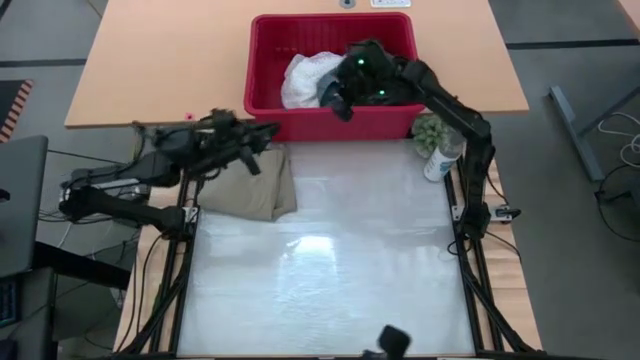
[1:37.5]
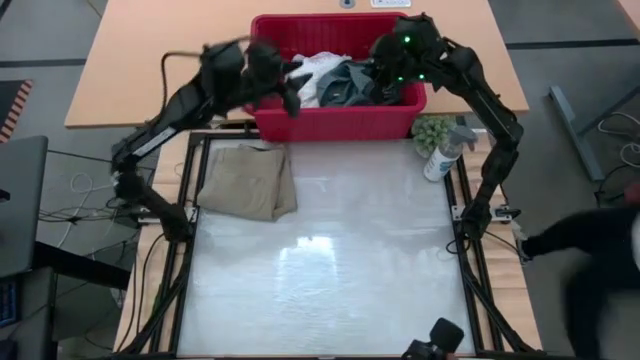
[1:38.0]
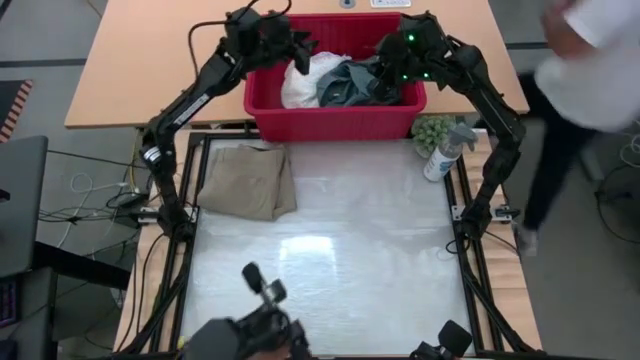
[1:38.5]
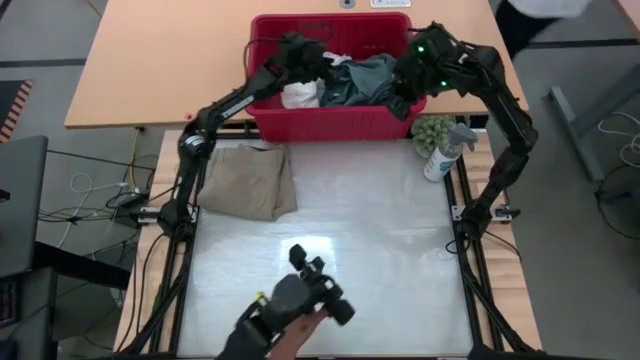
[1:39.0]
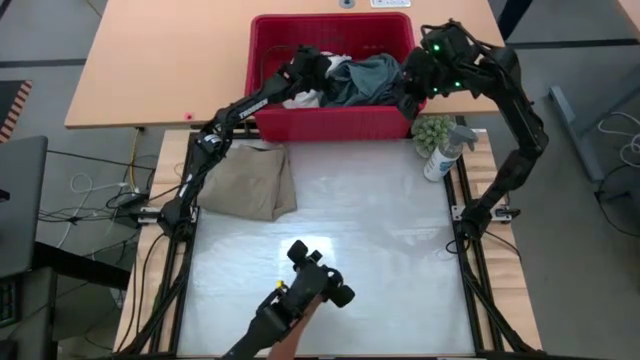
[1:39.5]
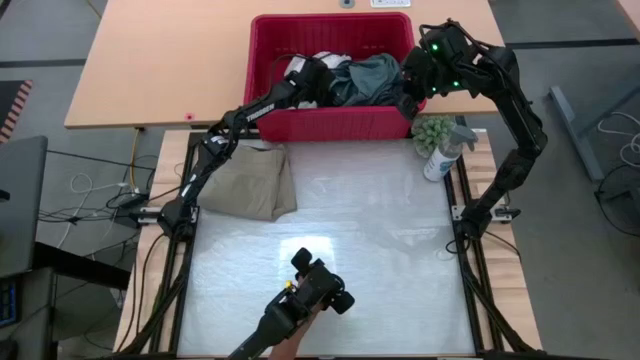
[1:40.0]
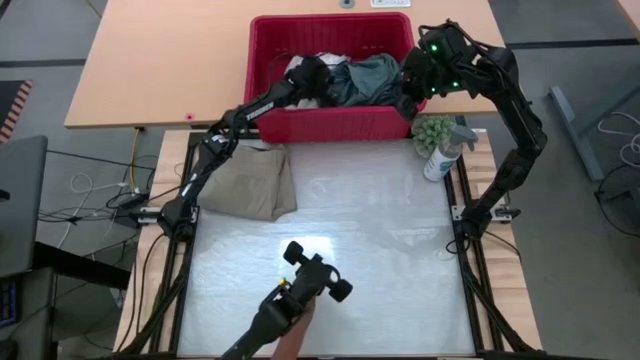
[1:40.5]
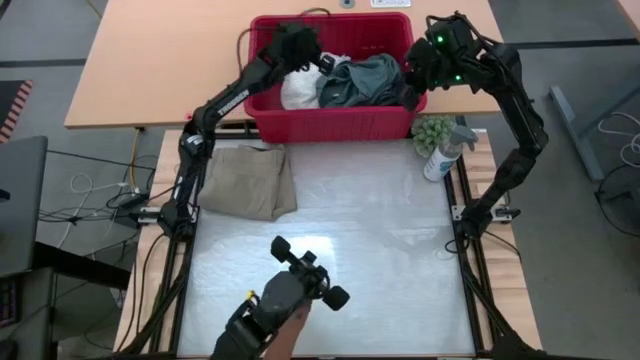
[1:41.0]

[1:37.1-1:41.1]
Task: Fold Laundry from Bin
Fold the blue pants in the red bin

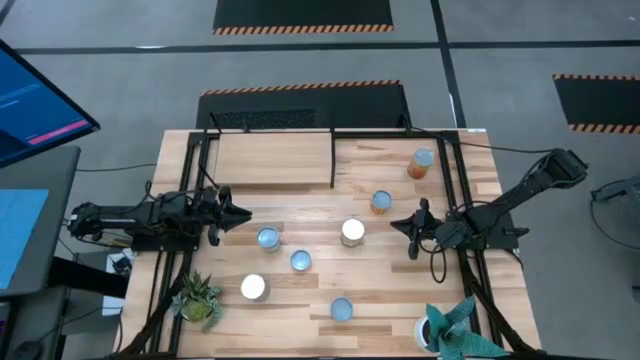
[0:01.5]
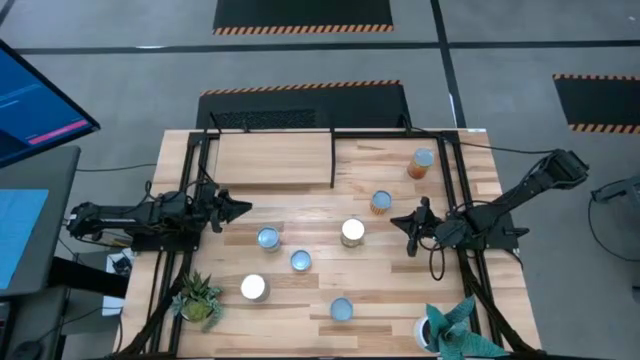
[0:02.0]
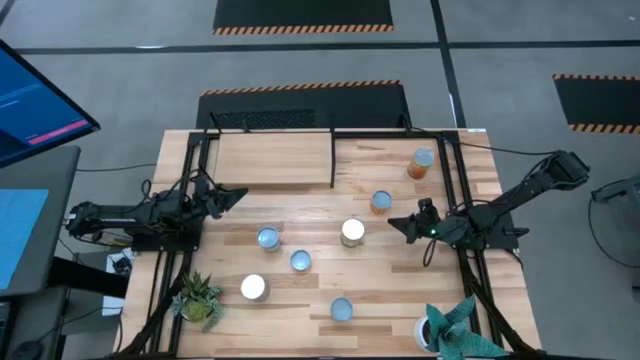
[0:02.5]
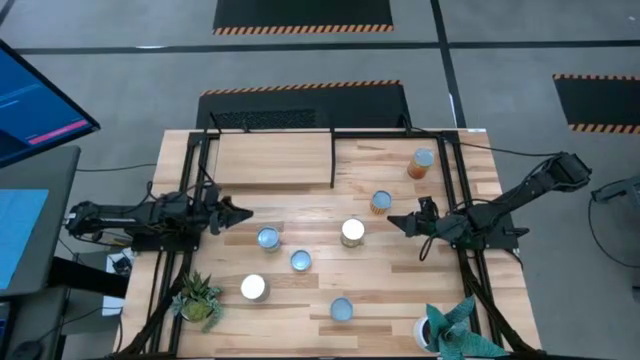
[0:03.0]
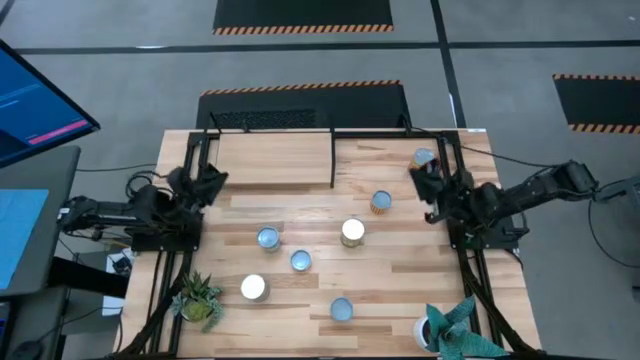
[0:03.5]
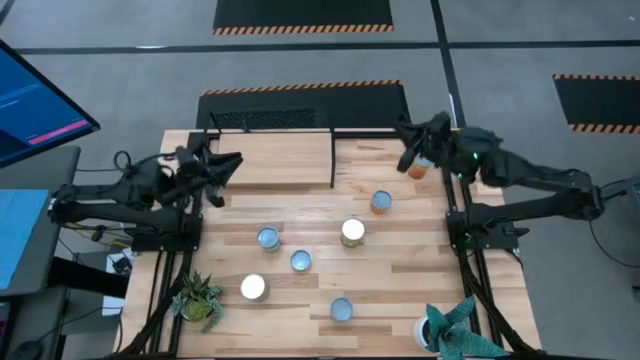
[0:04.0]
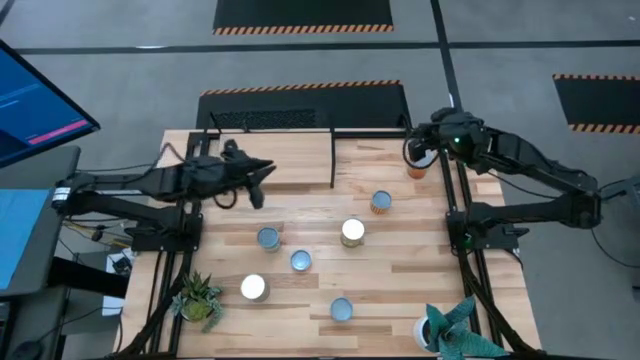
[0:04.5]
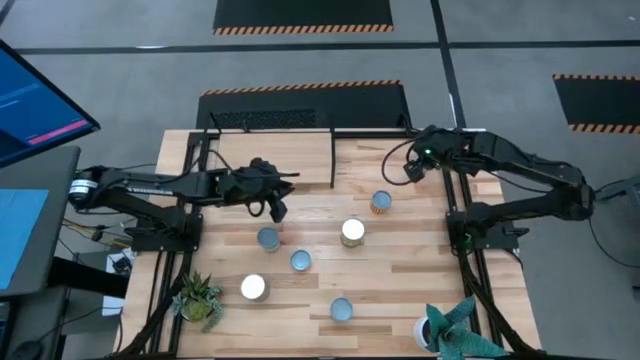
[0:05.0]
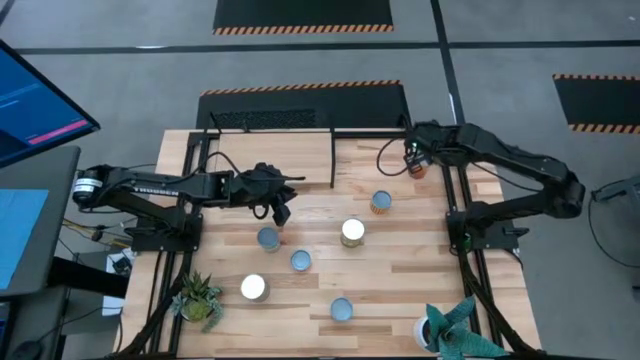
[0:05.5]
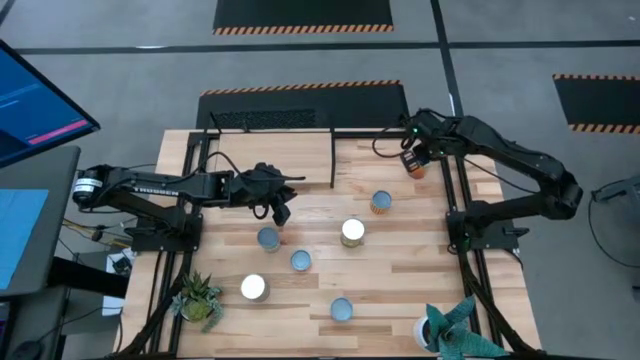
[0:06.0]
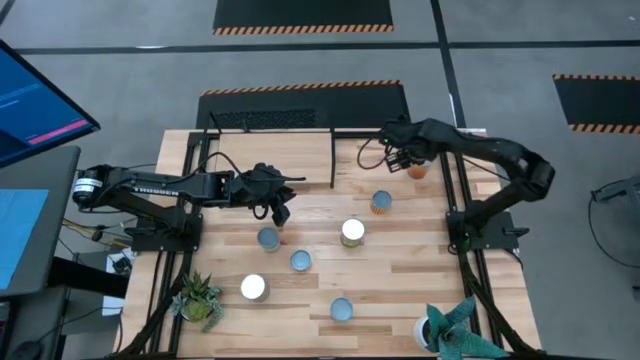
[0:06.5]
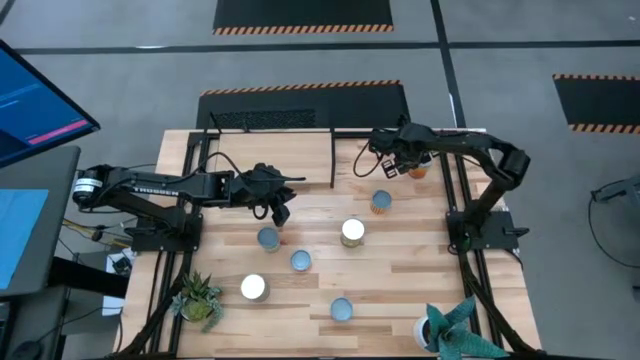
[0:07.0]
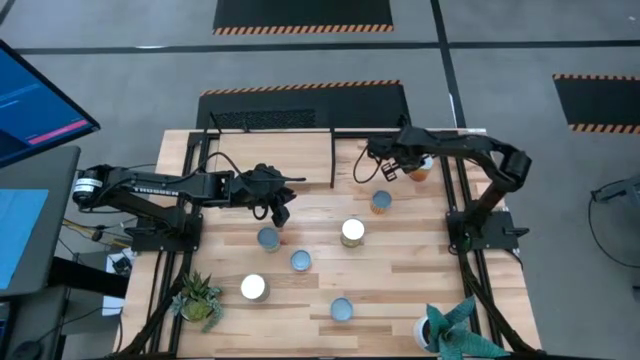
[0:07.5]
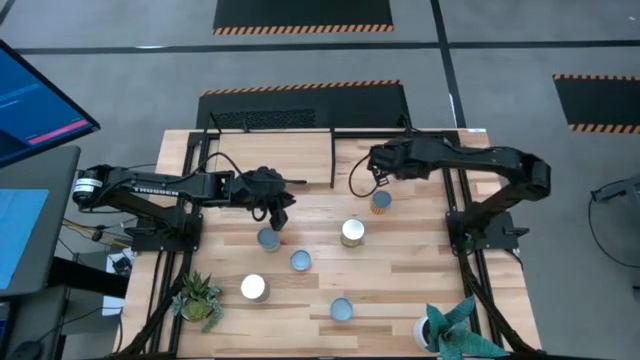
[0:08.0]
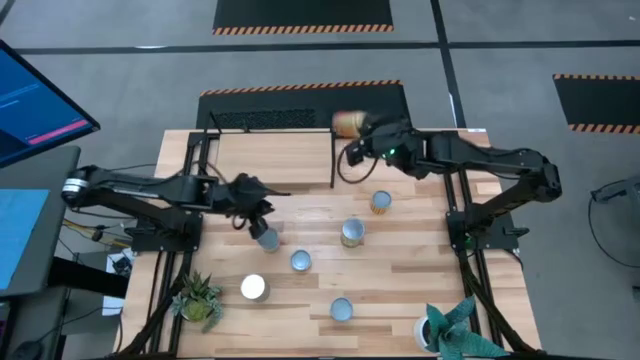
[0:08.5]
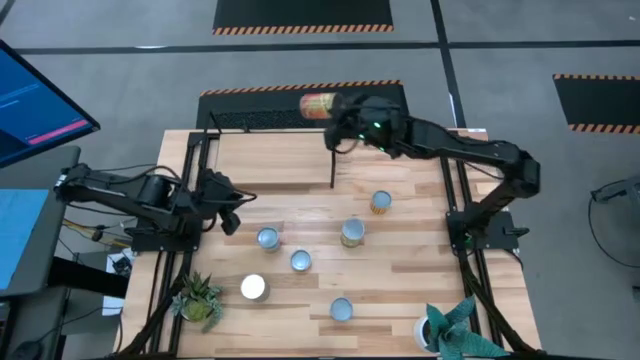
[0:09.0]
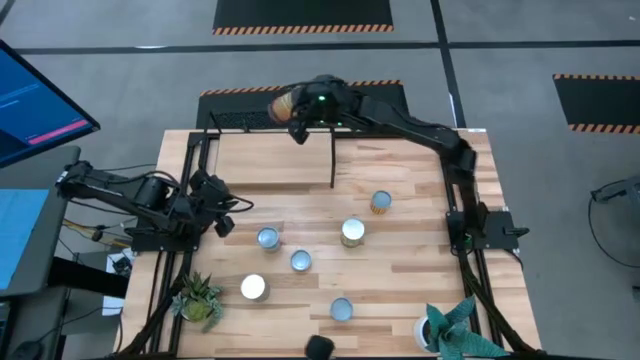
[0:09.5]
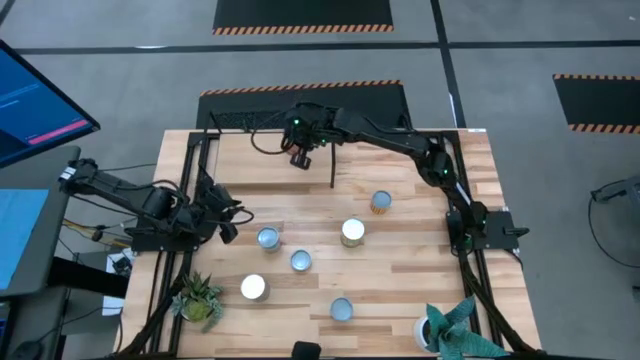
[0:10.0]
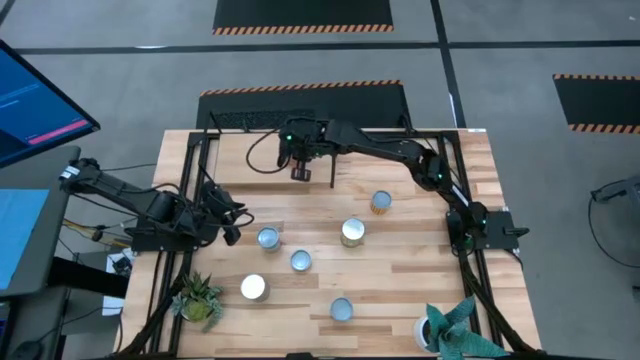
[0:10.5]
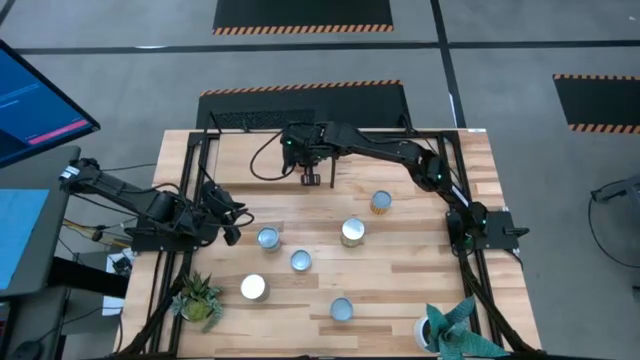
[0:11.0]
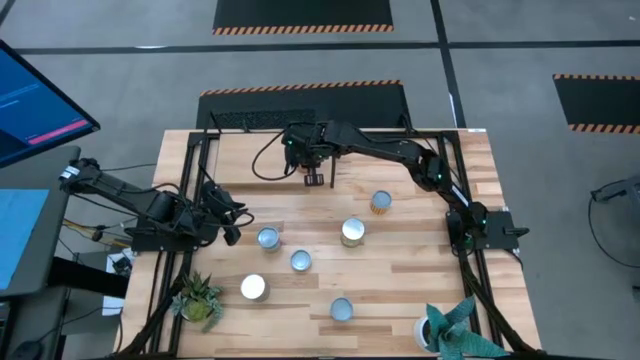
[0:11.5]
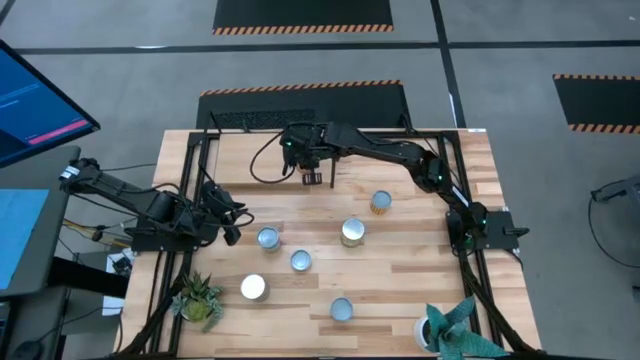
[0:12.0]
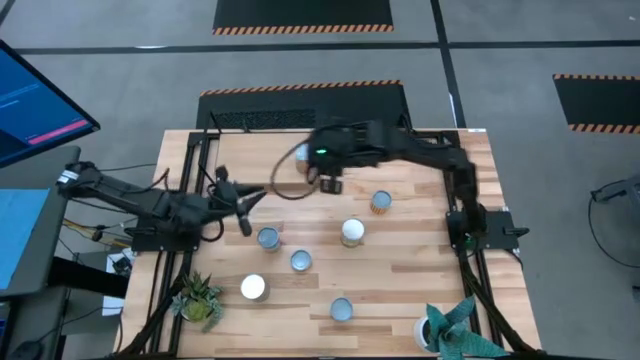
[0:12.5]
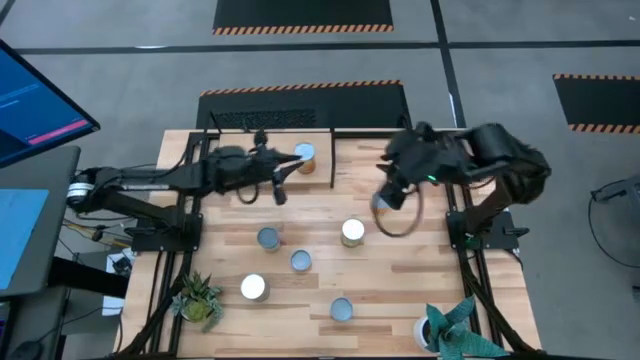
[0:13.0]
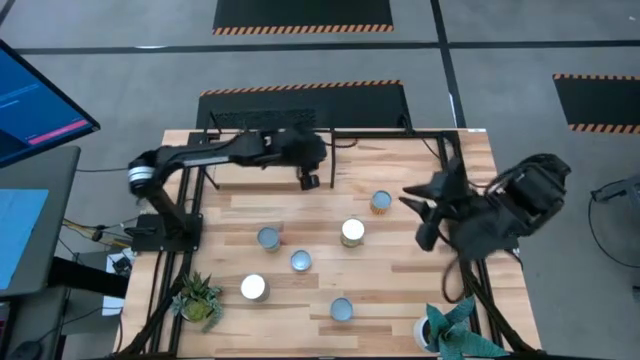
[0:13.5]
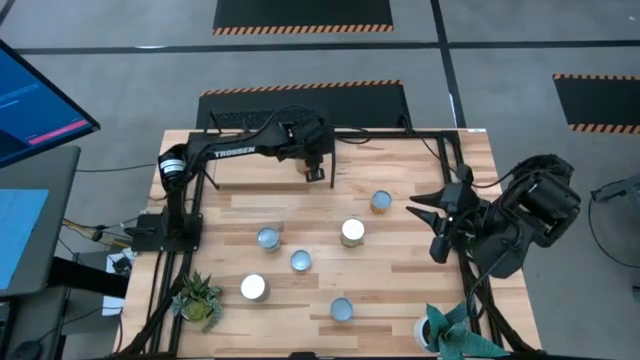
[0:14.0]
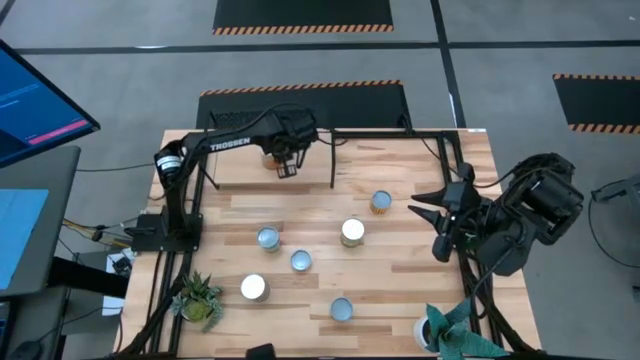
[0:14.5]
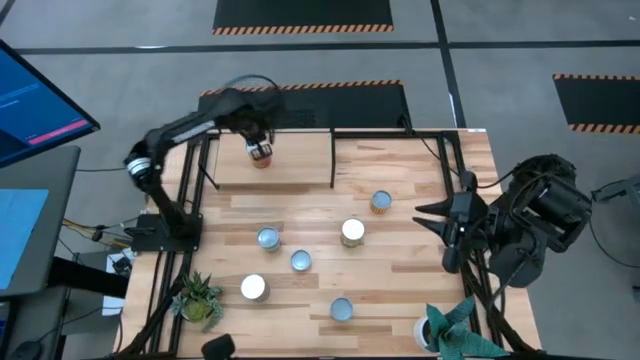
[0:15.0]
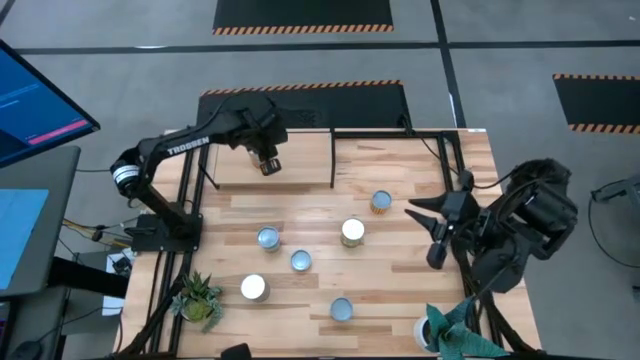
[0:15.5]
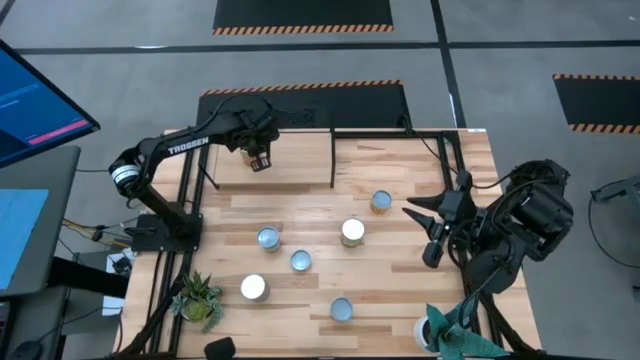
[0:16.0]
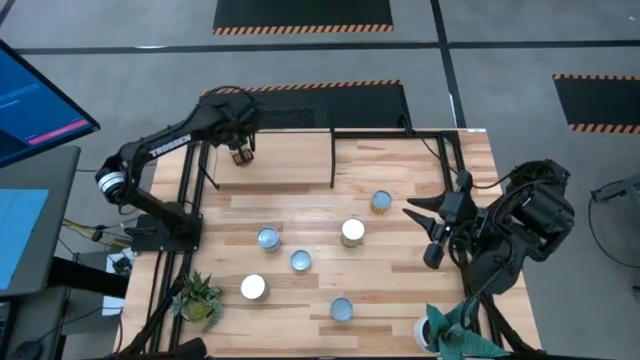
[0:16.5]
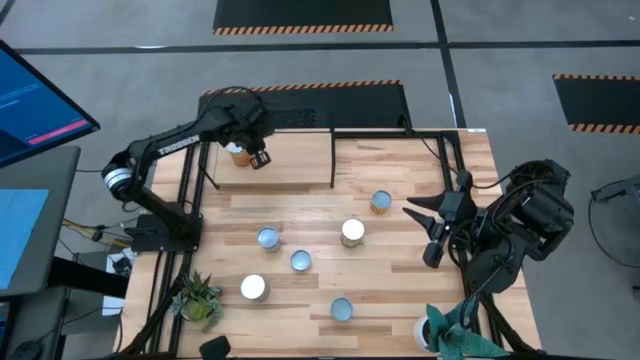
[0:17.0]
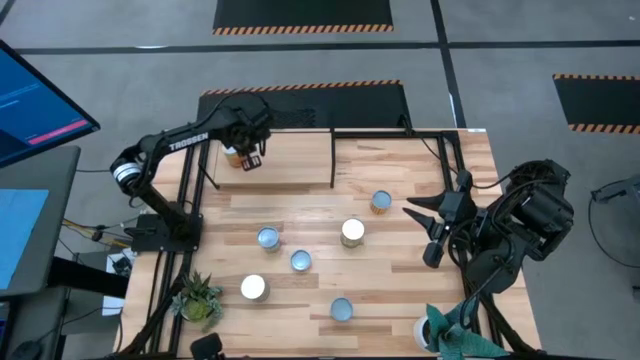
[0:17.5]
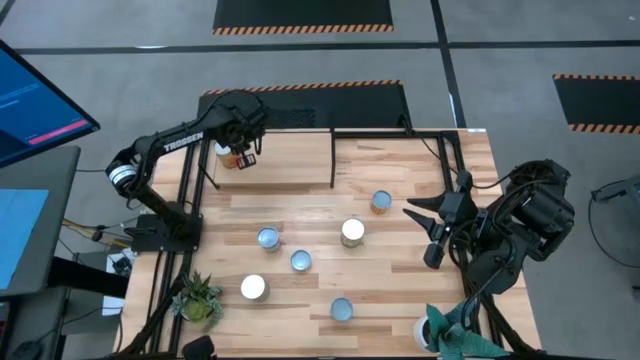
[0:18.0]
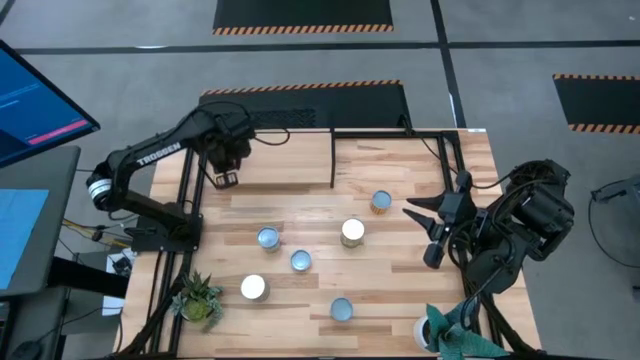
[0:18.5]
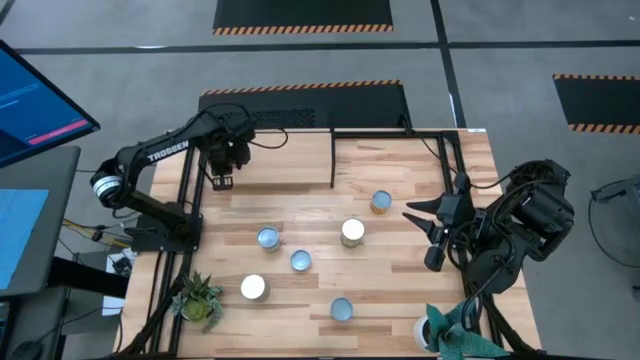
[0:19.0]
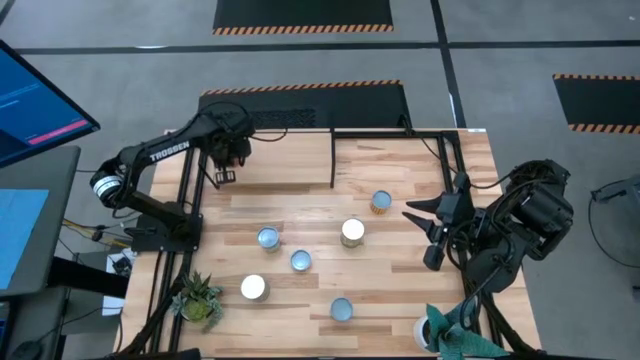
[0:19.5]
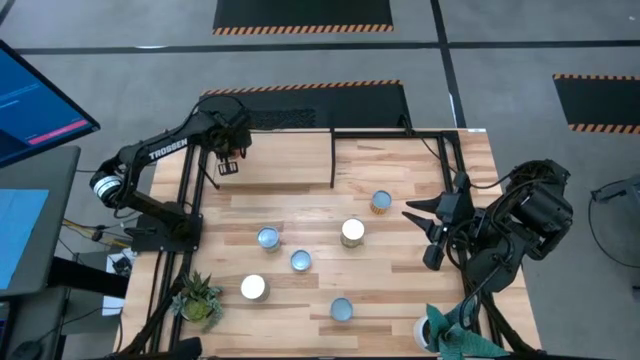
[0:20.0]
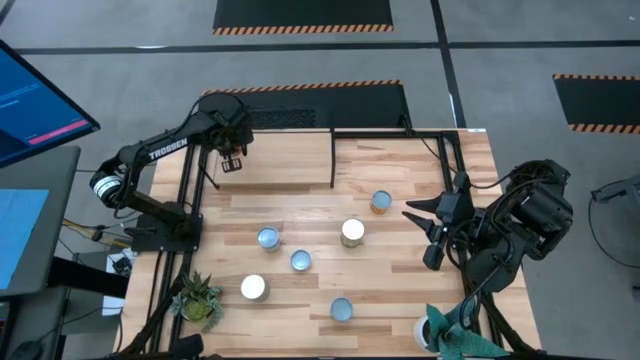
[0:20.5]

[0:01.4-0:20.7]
Task: Pick and place cans onto a shelf
Put the green peas can on the shelf
